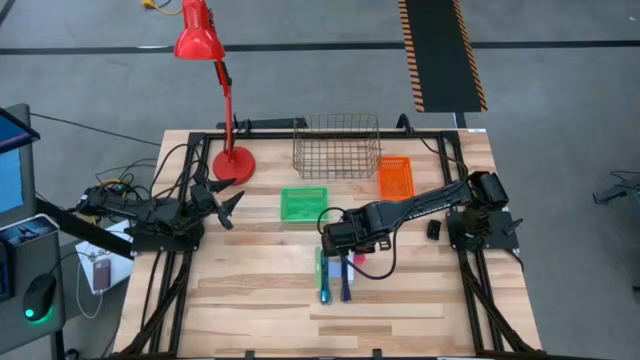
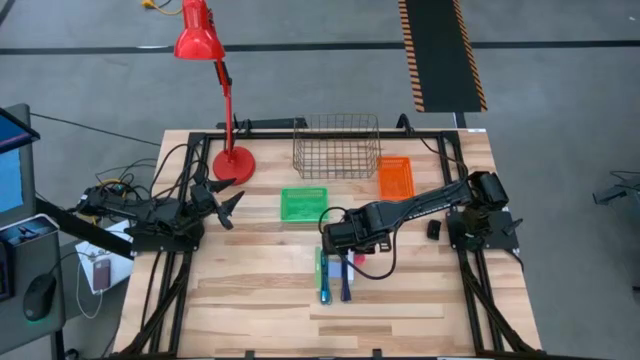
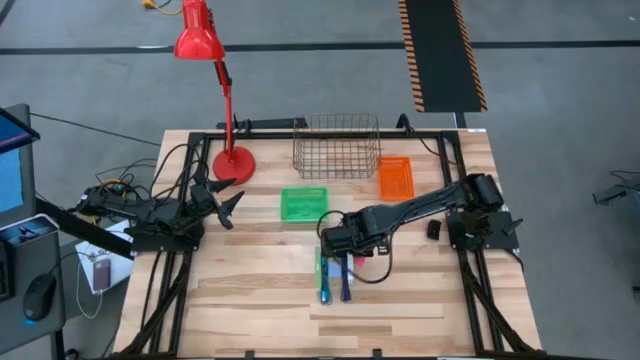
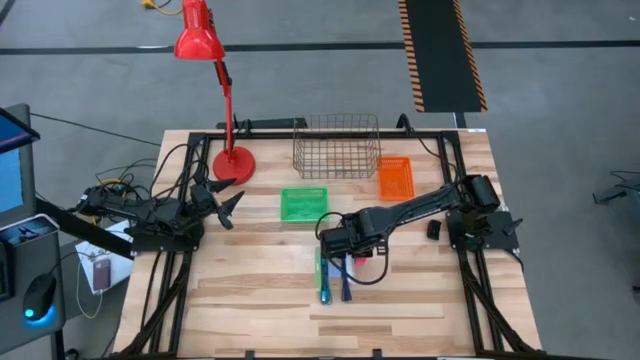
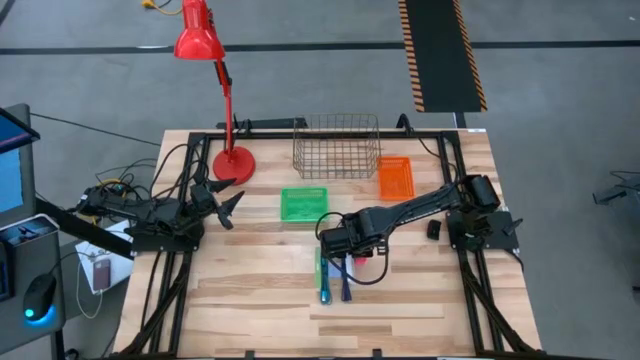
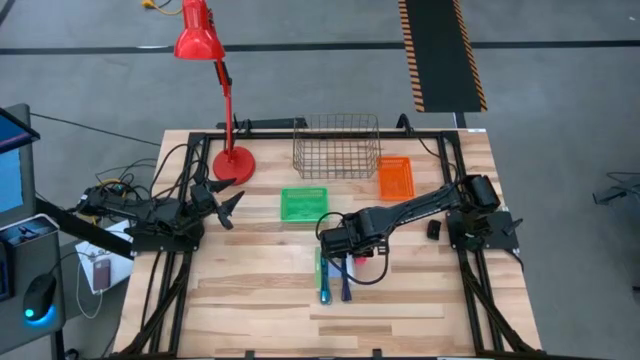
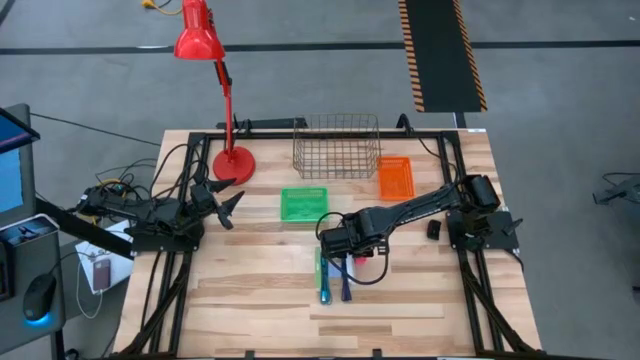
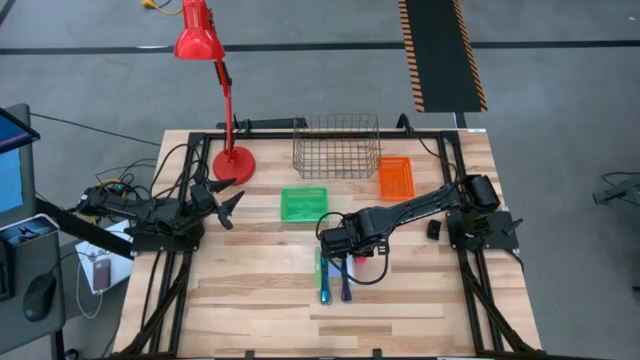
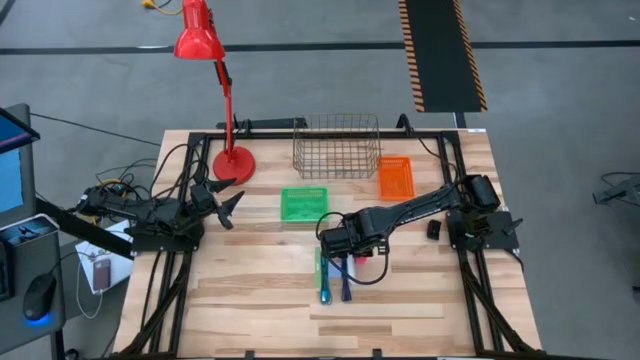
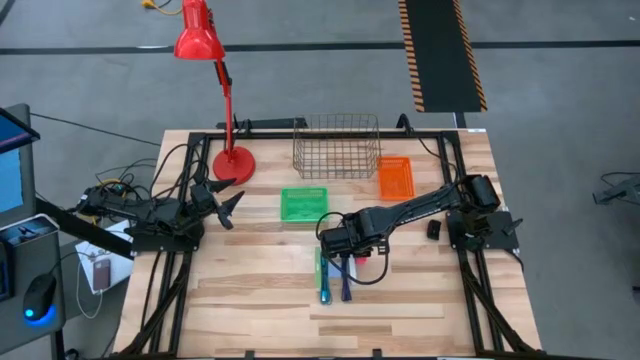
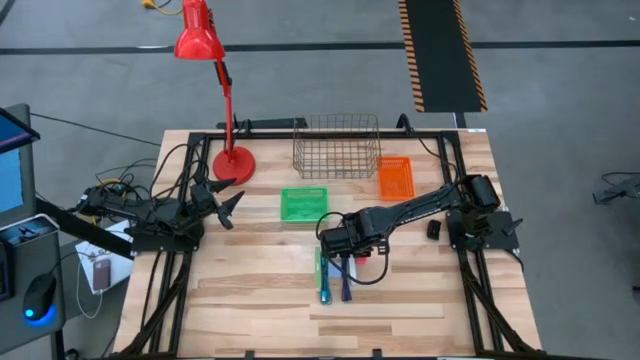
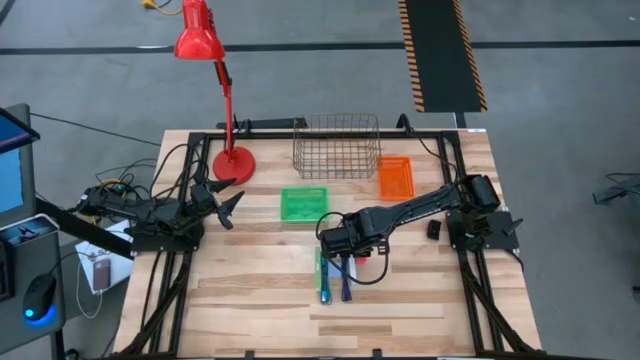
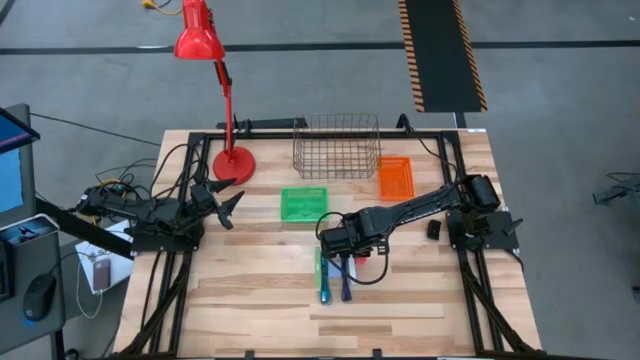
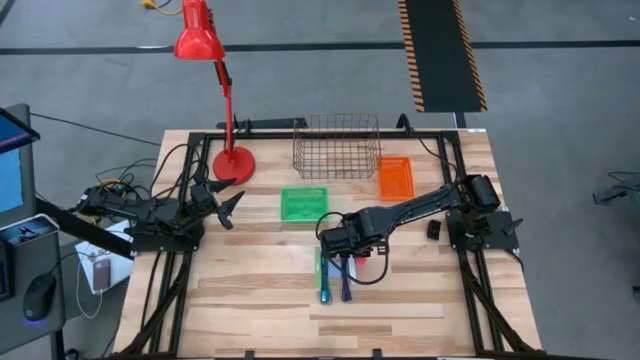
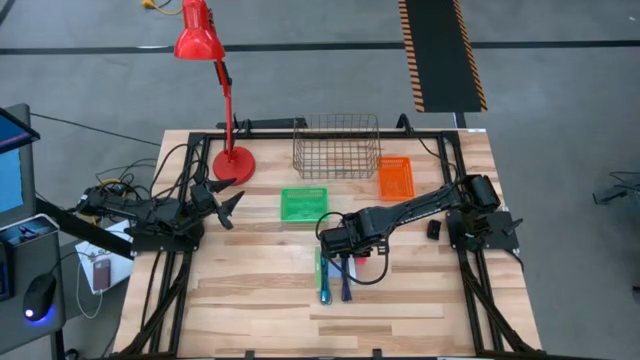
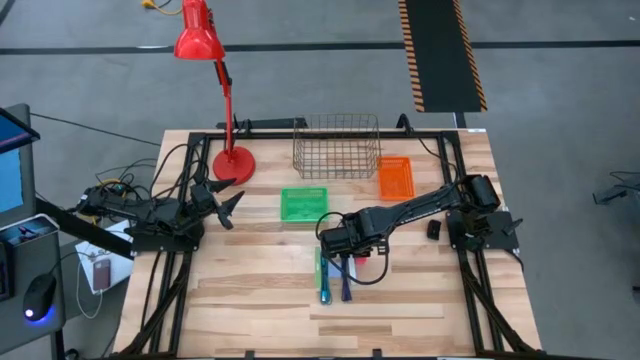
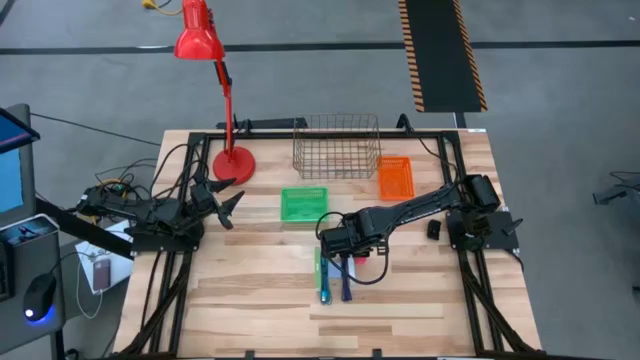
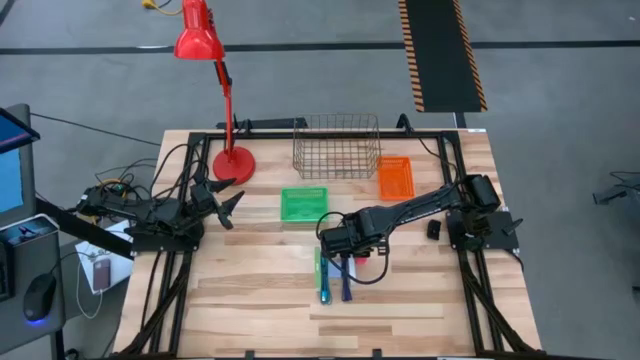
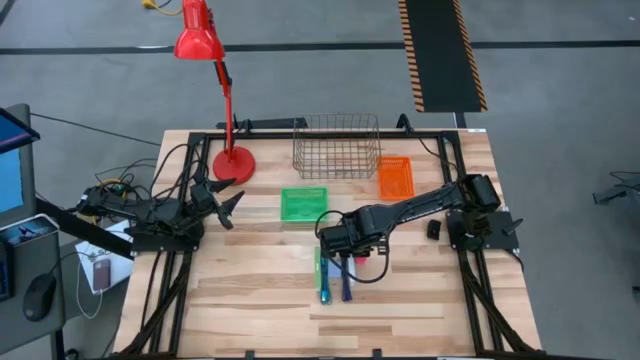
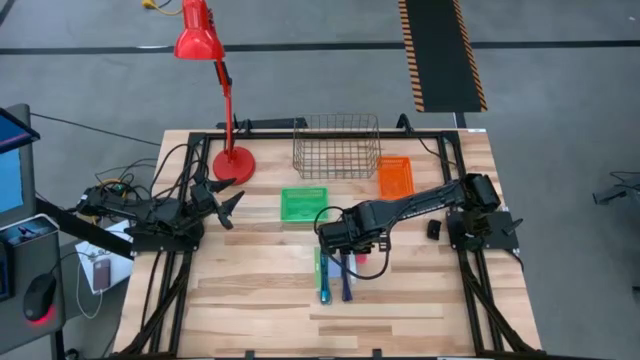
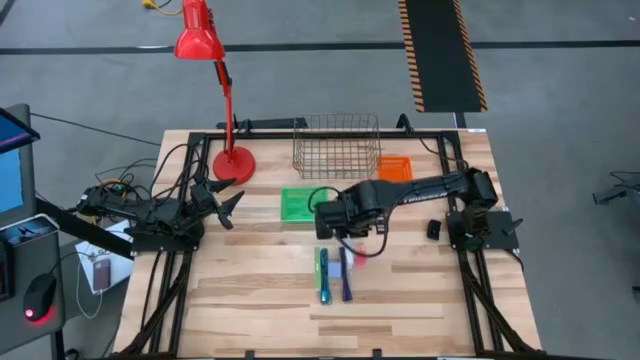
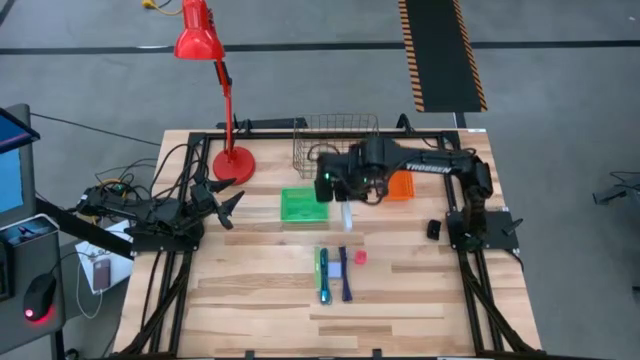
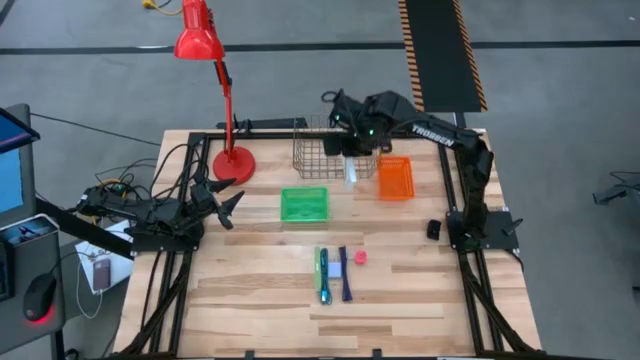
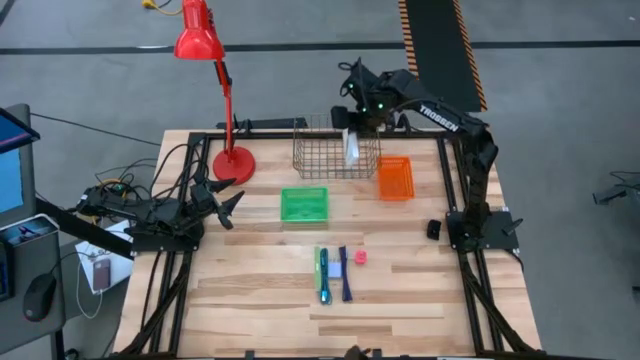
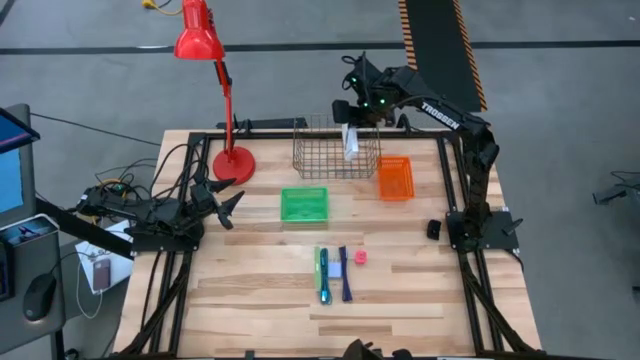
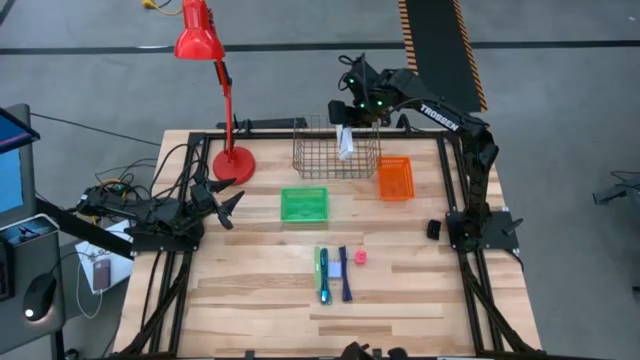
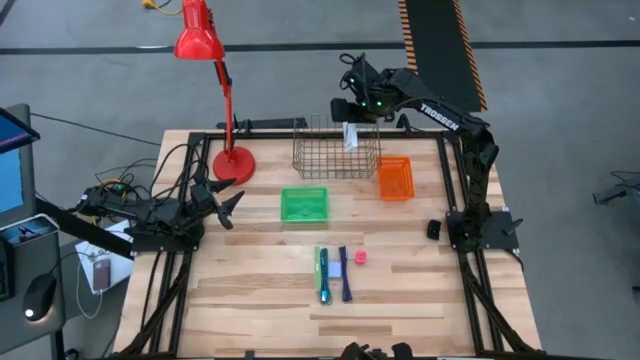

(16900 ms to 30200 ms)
Task: Pick and place items into bin
Put the left white card reader box into the gold wire basket
